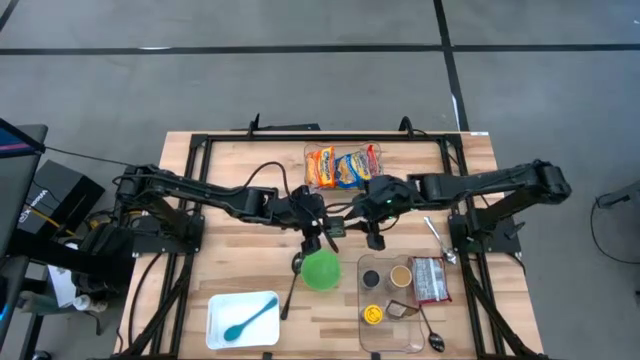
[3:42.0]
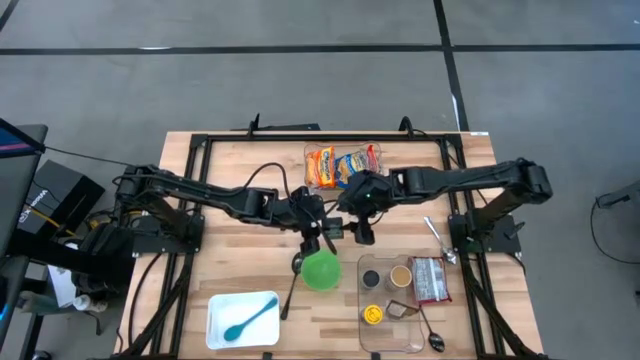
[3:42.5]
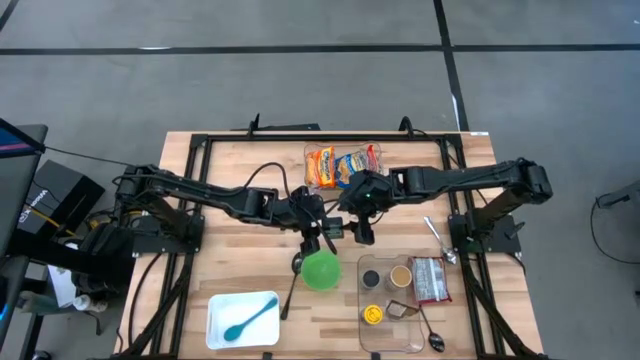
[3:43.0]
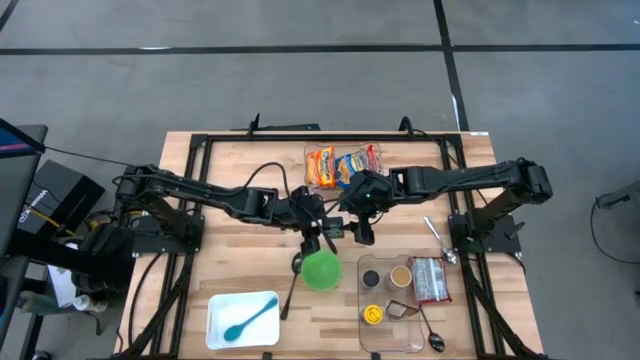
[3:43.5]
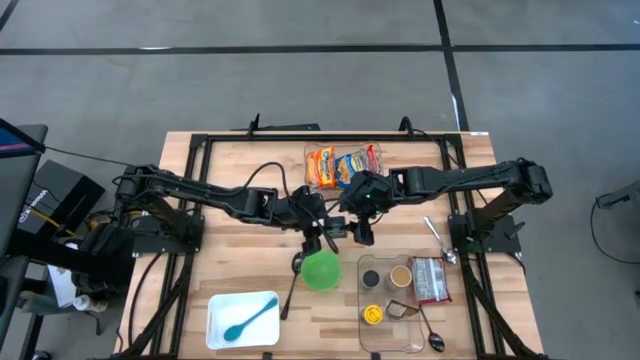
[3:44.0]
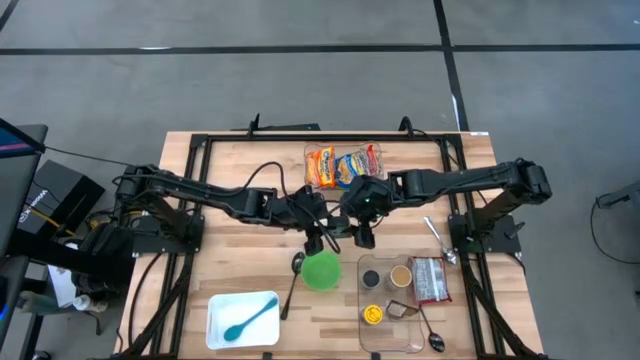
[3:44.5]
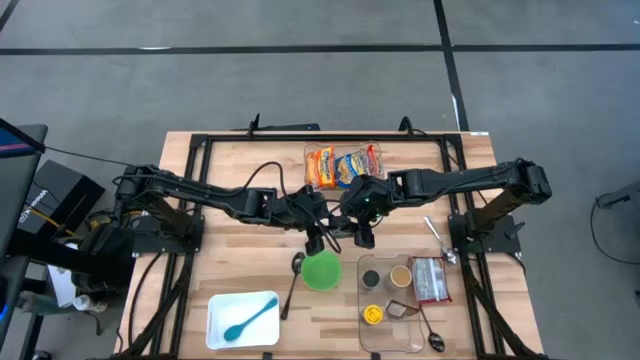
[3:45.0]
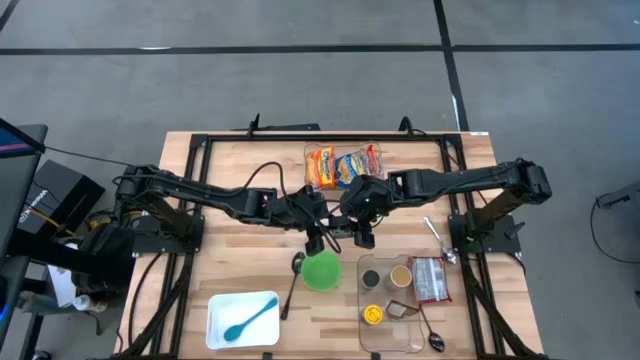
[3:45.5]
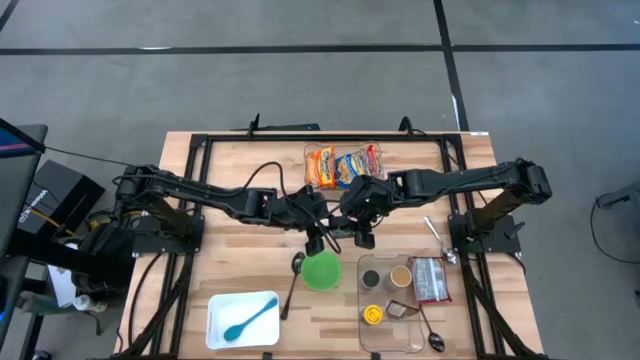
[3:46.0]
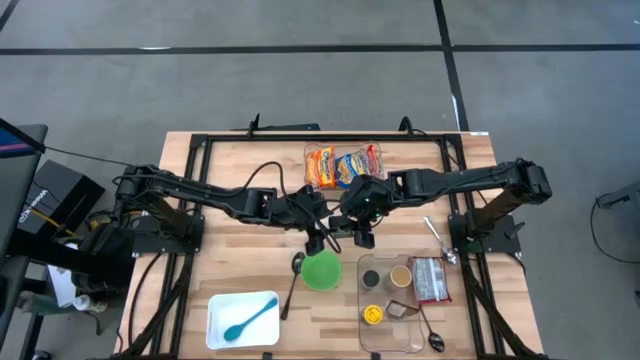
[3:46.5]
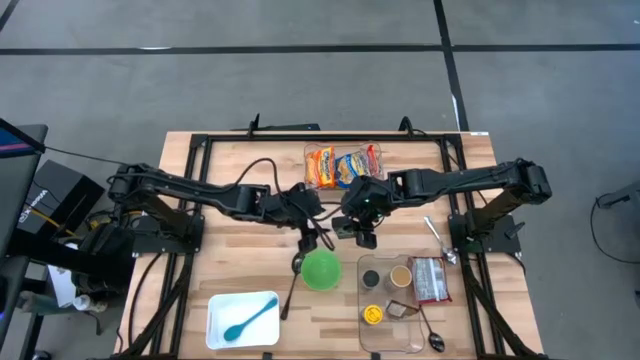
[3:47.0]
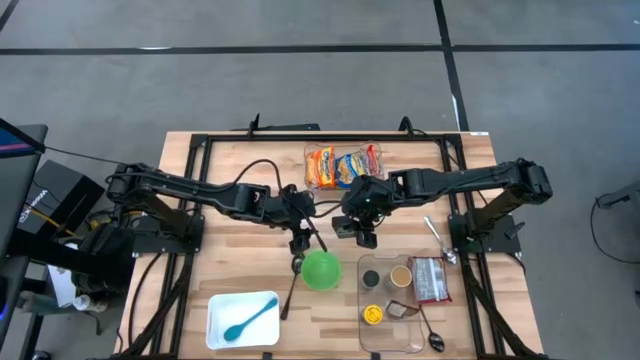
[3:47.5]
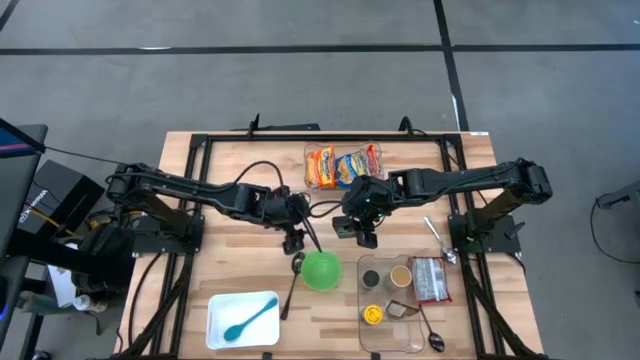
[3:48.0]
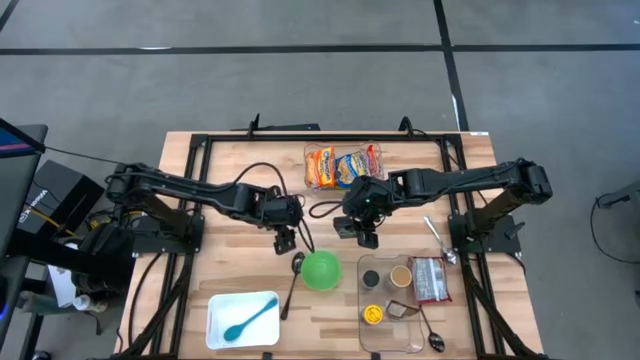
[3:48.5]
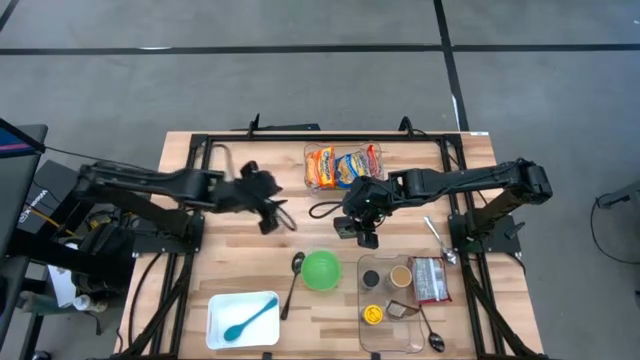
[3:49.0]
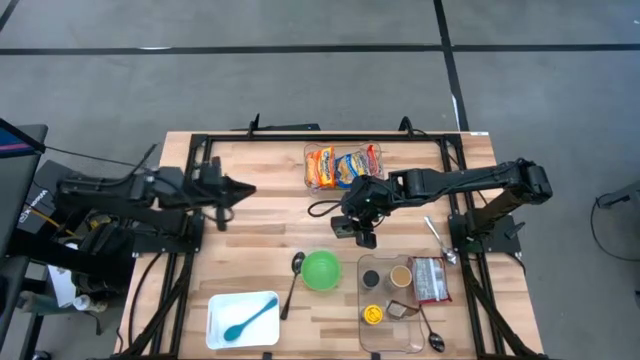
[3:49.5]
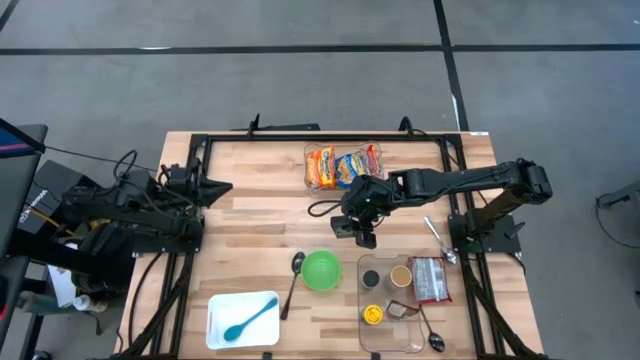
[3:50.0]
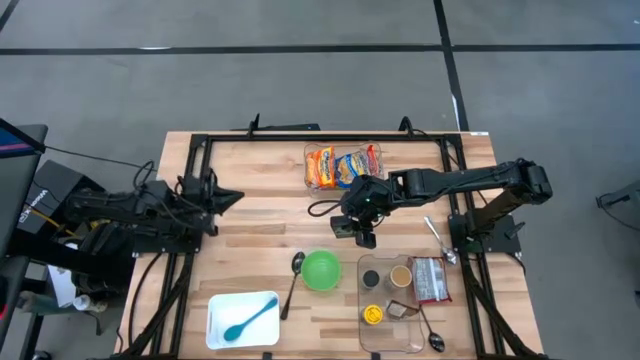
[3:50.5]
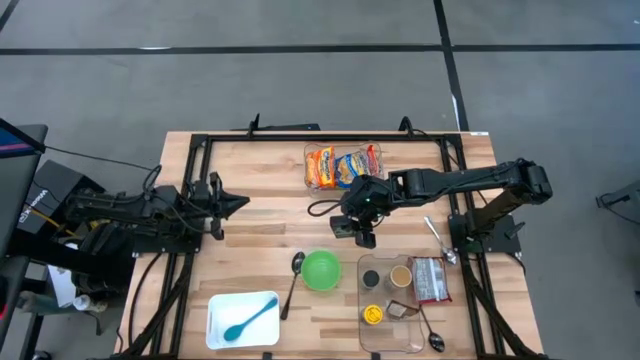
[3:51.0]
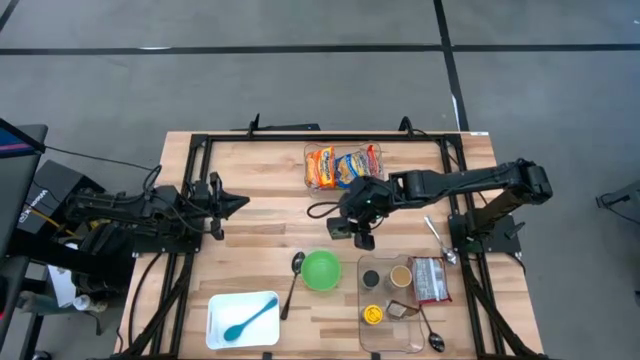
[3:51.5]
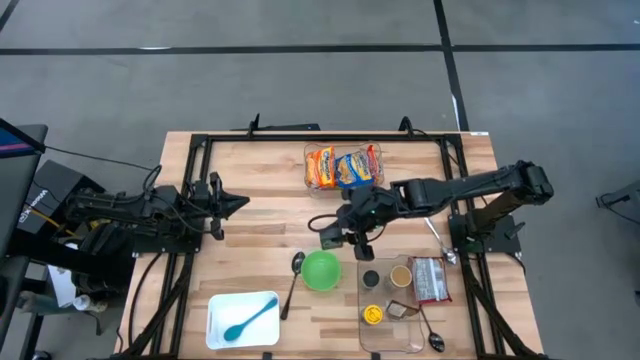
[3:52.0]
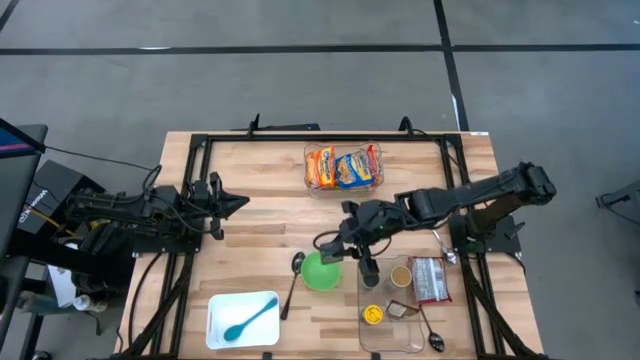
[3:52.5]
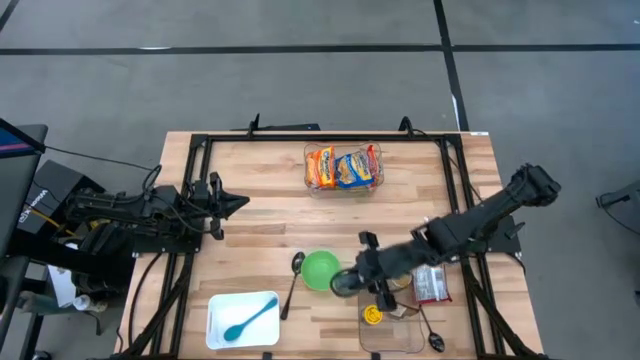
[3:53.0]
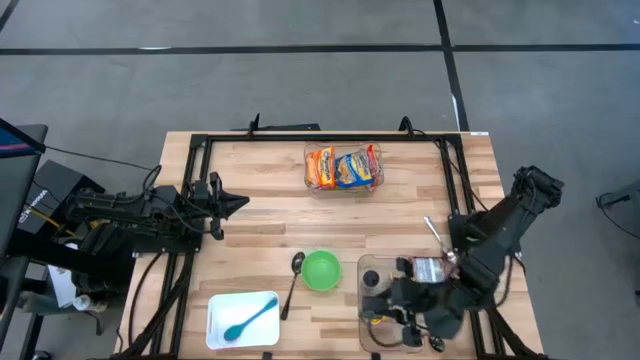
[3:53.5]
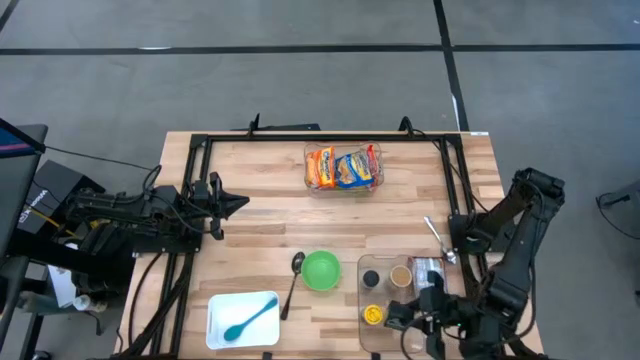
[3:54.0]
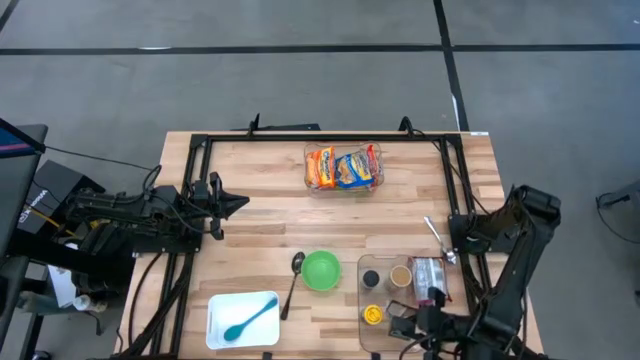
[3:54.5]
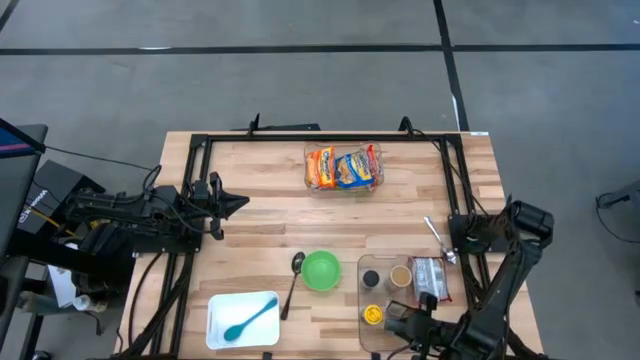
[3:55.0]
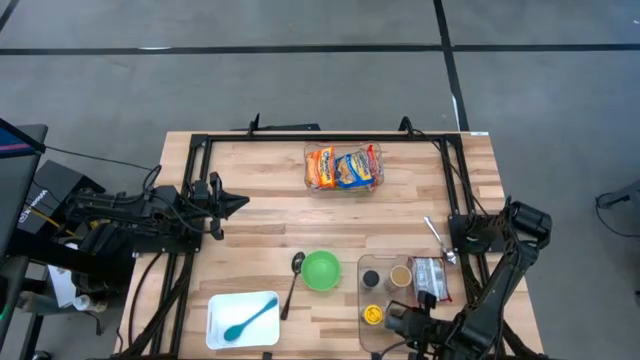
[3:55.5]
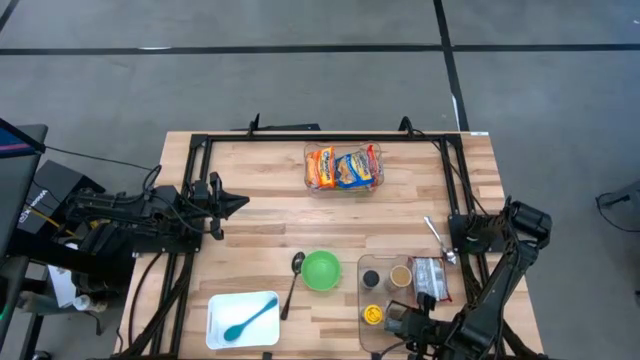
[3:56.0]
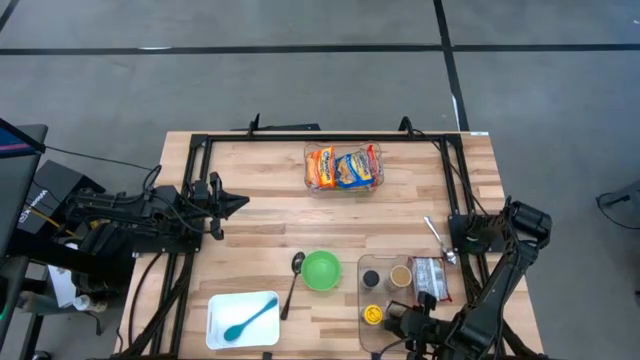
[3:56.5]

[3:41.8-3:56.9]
Task: Pick & Place Food Item
Put the red seasoning into the bottom transparent bin

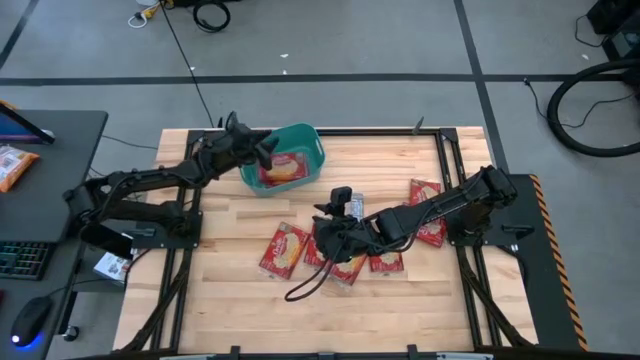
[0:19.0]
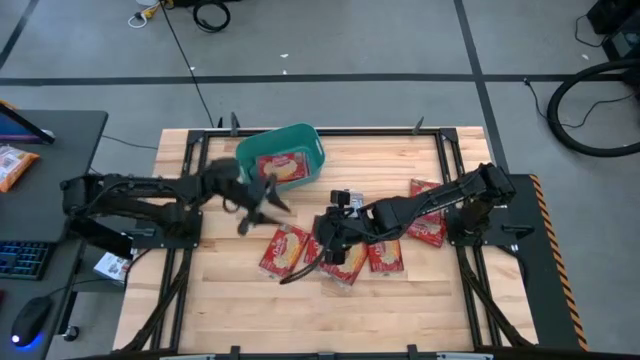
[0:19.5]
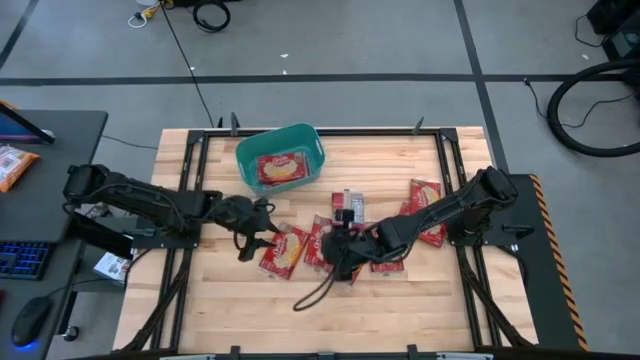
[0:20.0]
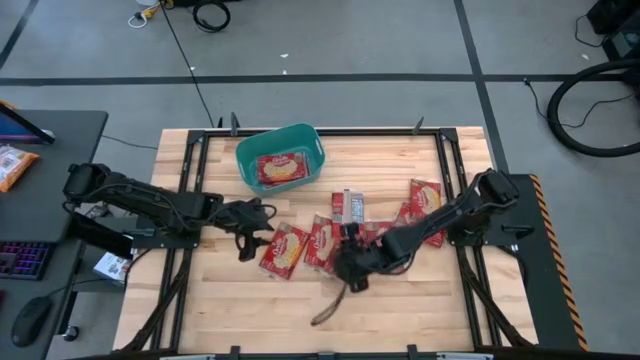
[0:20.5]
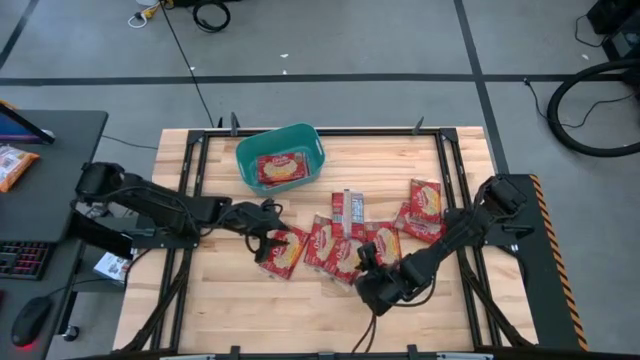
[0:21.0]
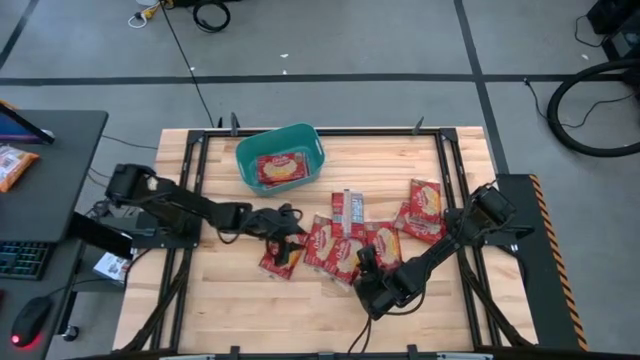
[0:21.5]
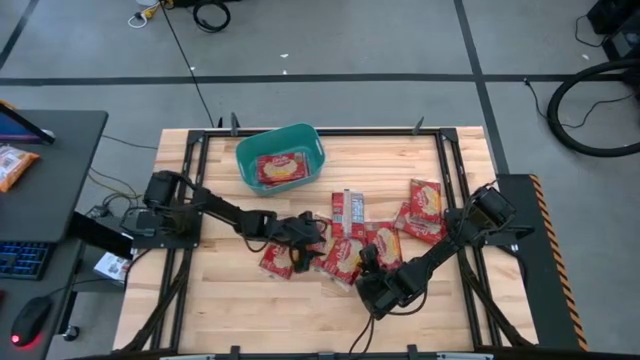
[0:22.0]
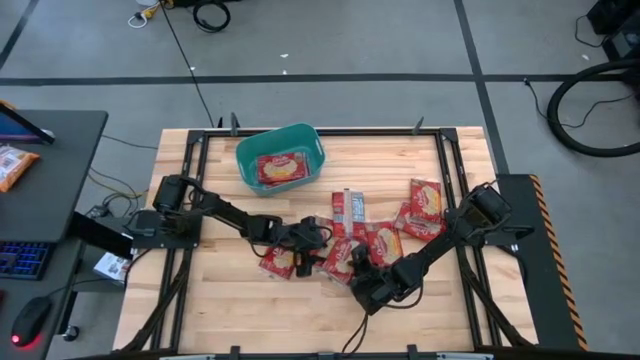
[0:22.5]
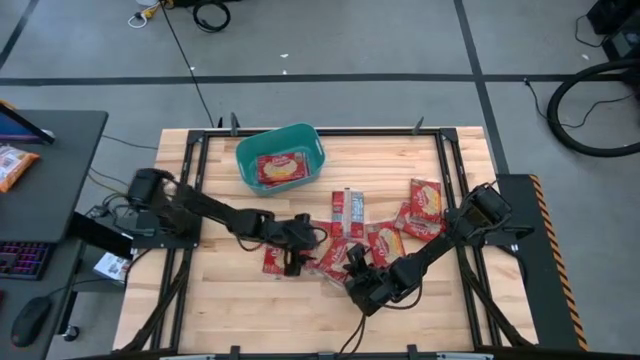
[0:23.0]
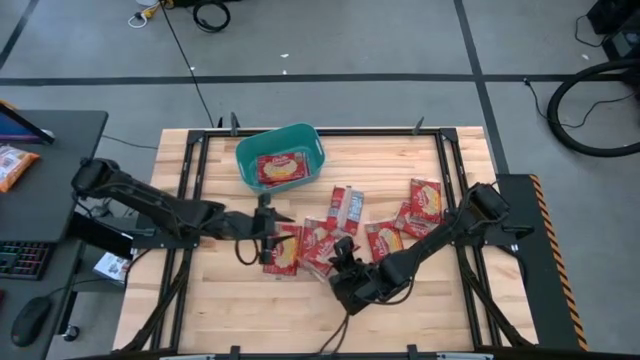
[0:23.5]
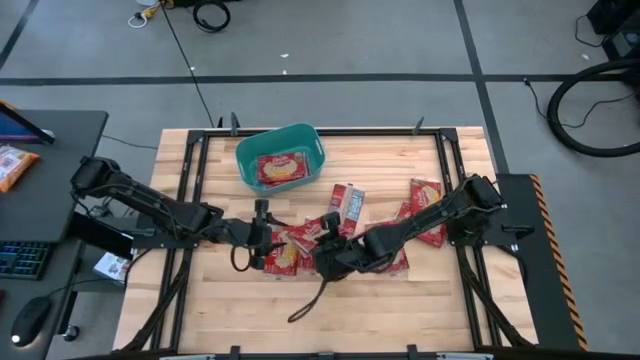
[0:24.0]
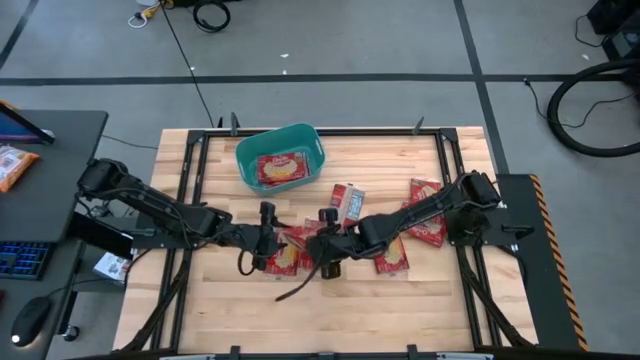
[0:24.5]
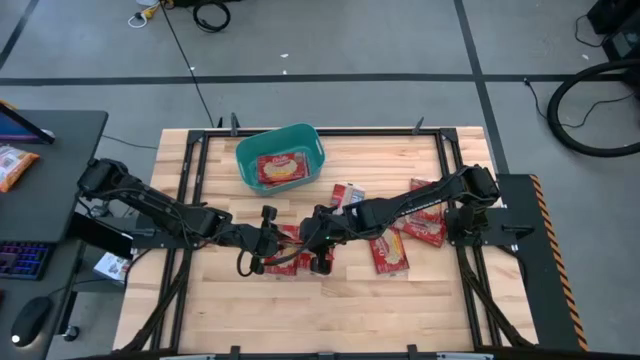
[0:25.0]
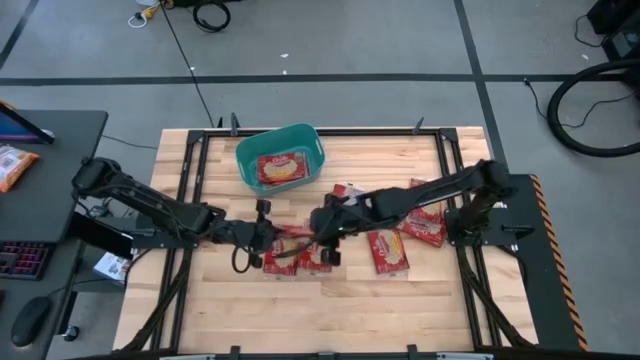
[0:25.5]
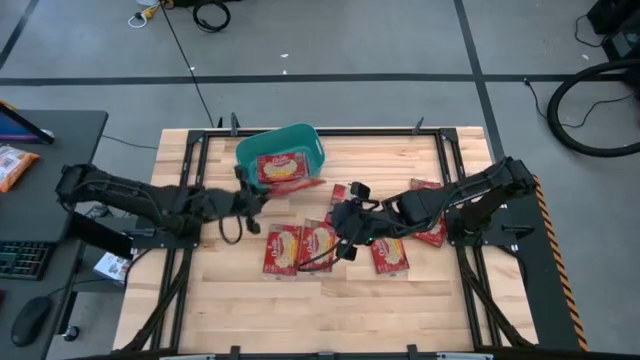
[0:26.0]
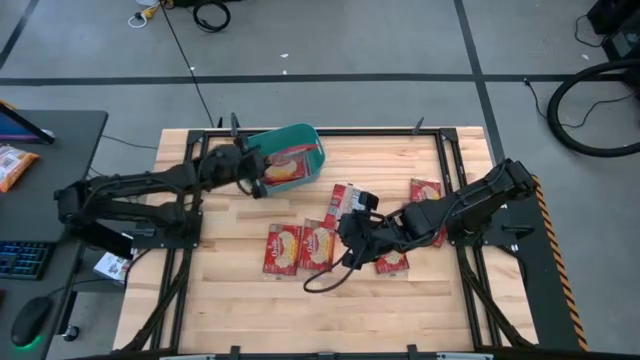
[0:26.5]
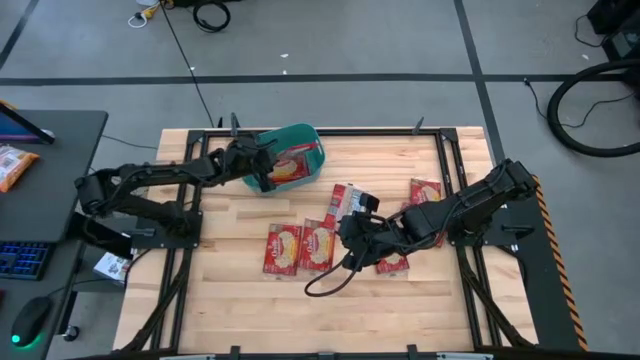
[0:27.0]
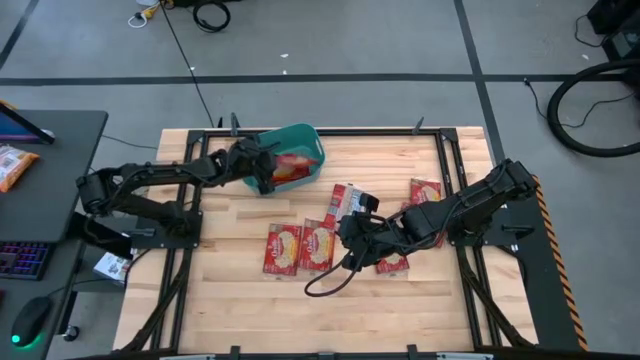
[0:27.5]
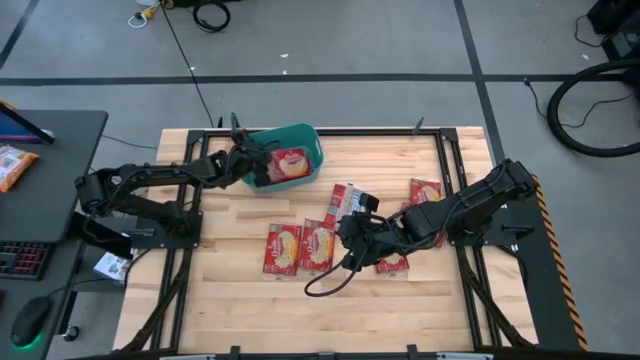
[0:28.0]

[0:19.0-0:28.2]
Task: Sort popcorn bags into baskets
Put the red popcorn bag into the green bin
